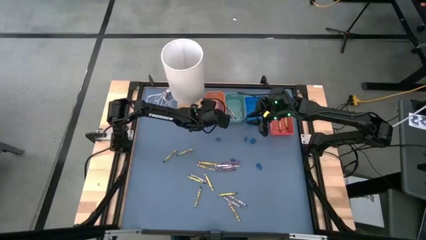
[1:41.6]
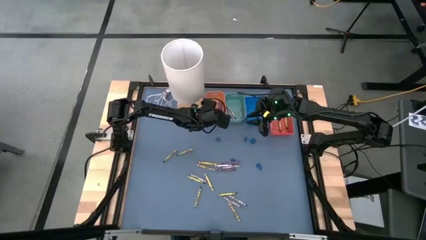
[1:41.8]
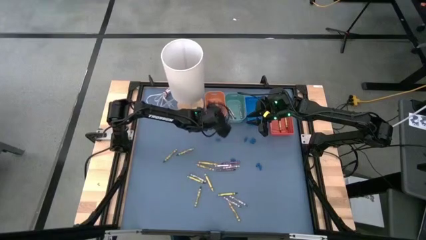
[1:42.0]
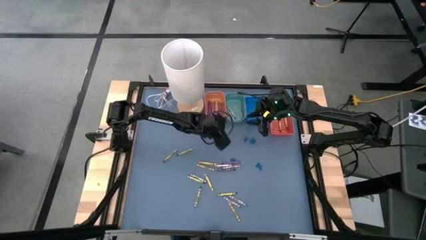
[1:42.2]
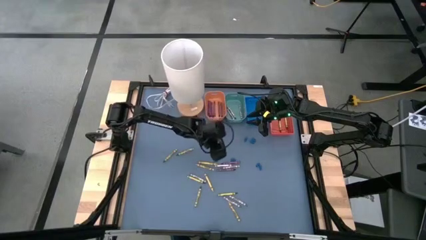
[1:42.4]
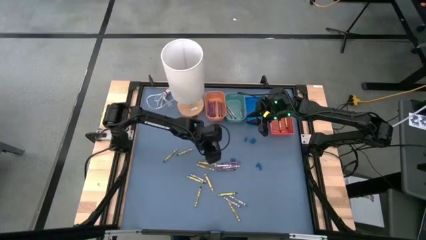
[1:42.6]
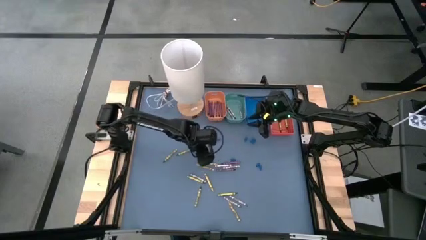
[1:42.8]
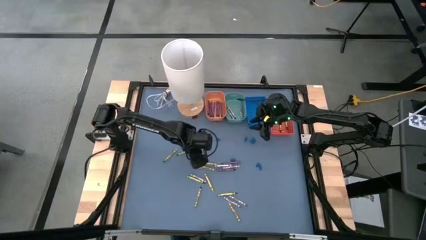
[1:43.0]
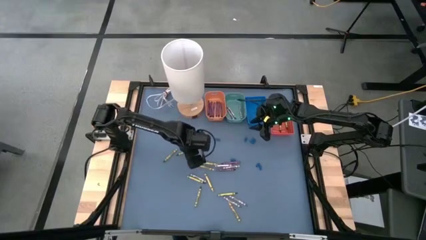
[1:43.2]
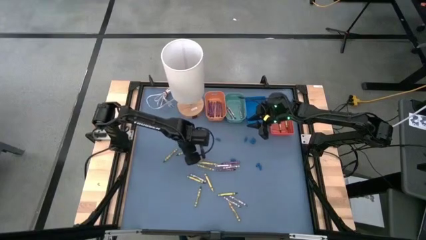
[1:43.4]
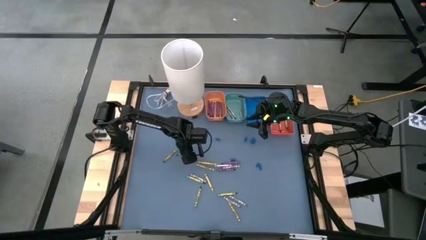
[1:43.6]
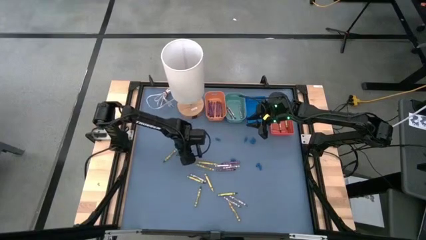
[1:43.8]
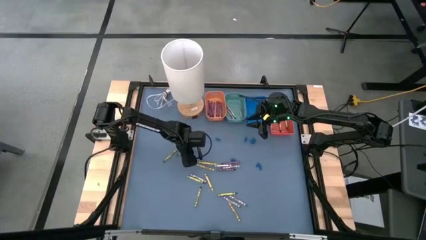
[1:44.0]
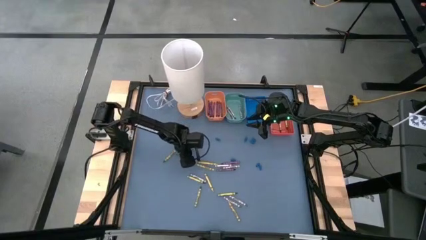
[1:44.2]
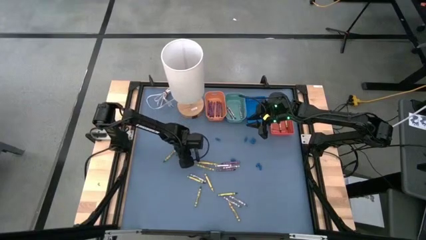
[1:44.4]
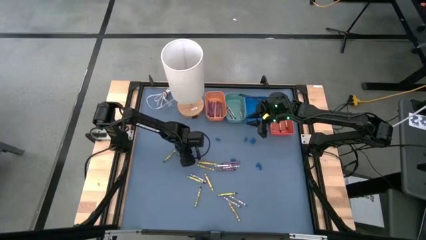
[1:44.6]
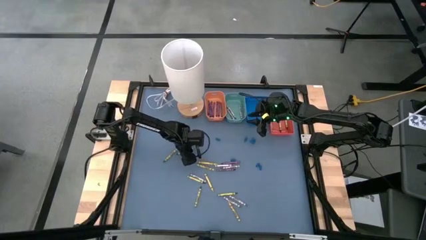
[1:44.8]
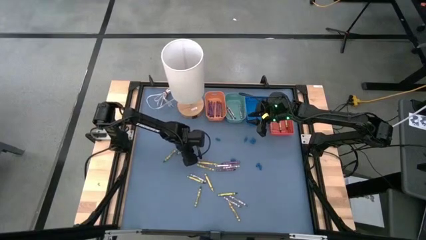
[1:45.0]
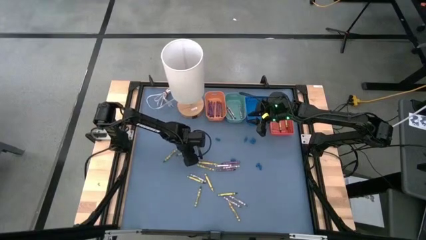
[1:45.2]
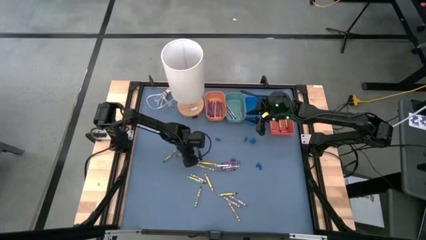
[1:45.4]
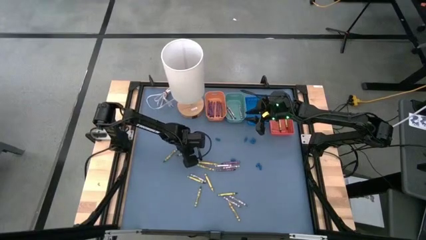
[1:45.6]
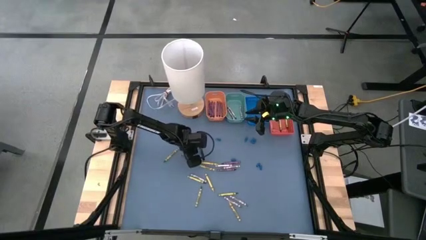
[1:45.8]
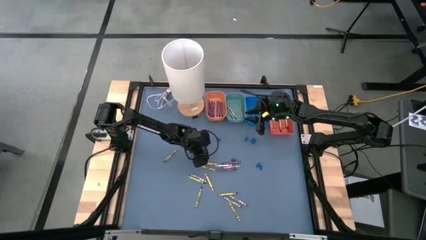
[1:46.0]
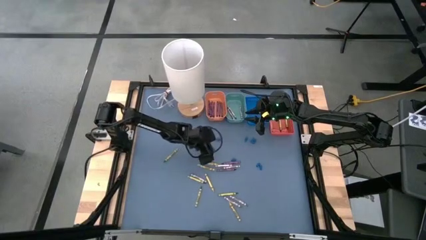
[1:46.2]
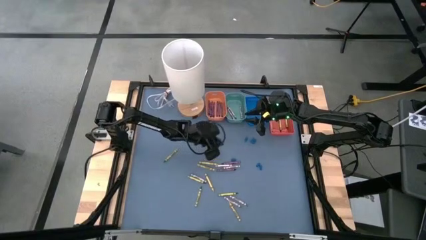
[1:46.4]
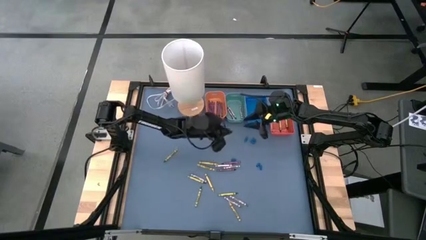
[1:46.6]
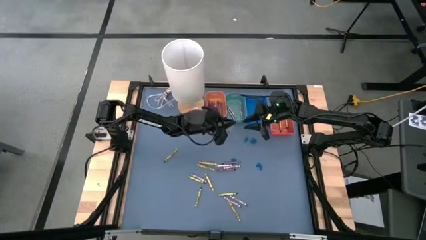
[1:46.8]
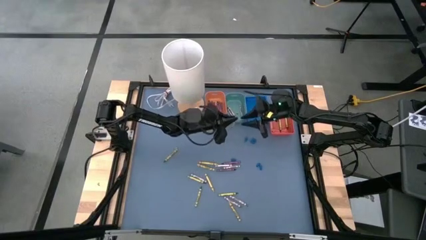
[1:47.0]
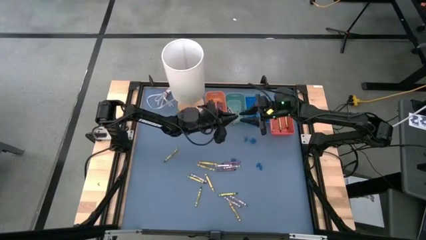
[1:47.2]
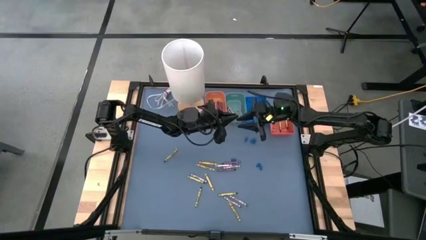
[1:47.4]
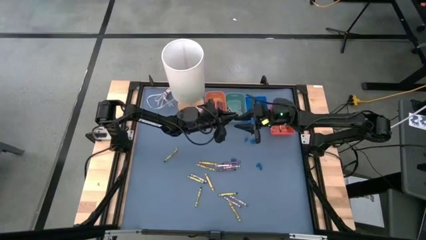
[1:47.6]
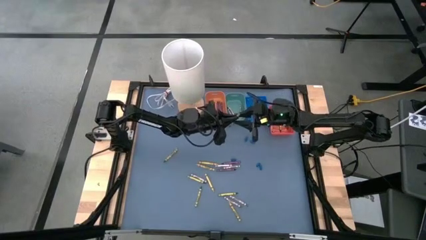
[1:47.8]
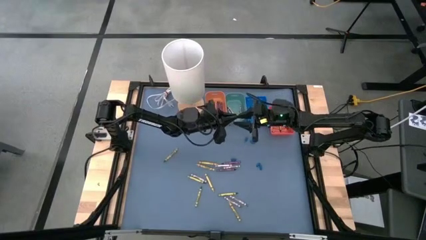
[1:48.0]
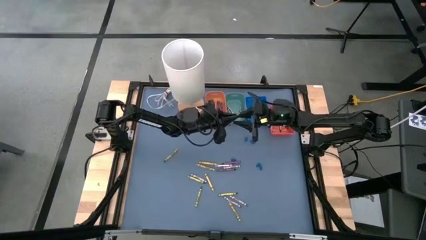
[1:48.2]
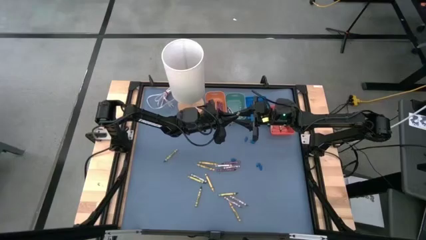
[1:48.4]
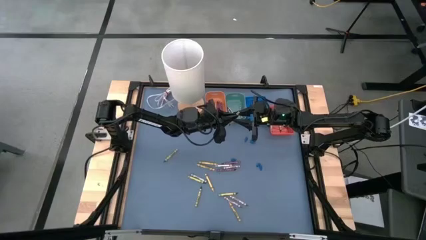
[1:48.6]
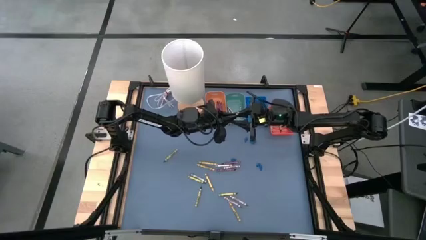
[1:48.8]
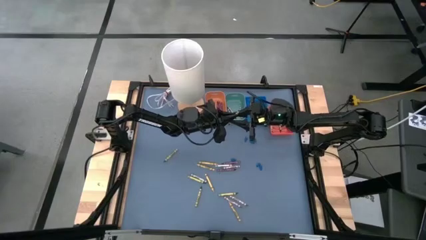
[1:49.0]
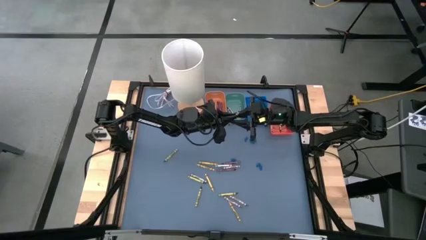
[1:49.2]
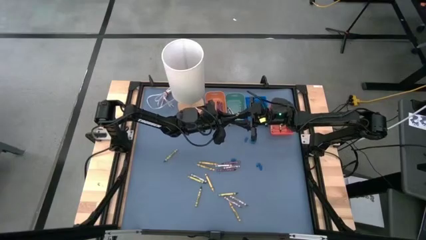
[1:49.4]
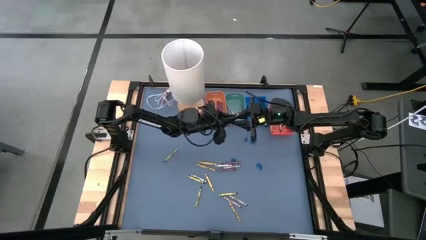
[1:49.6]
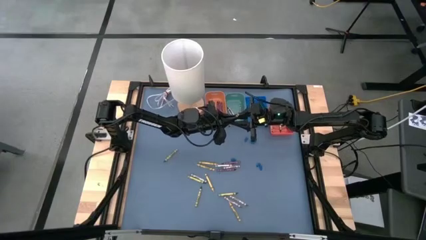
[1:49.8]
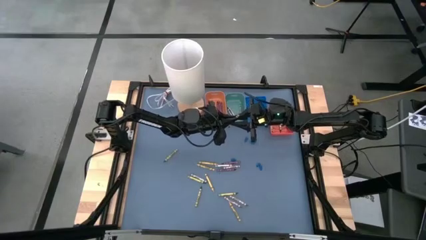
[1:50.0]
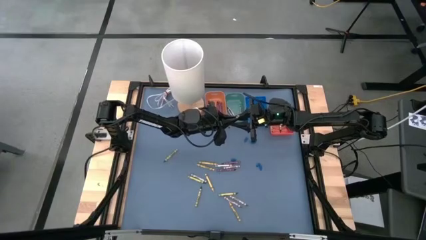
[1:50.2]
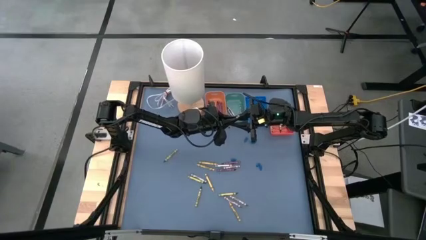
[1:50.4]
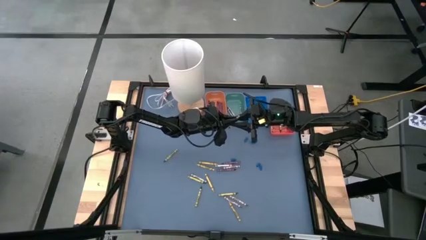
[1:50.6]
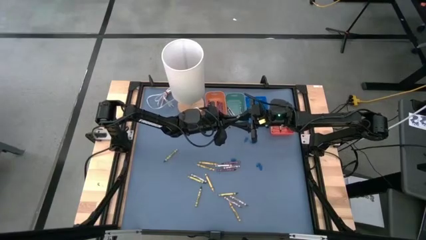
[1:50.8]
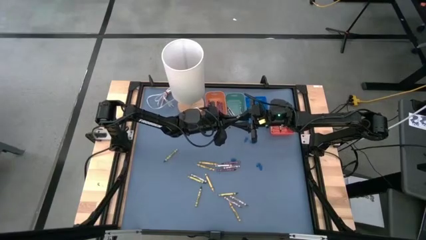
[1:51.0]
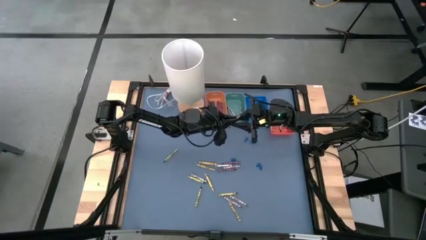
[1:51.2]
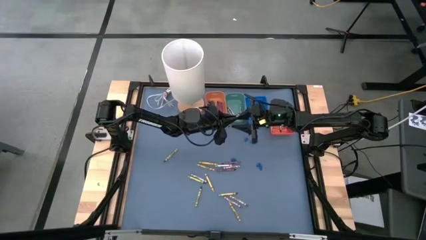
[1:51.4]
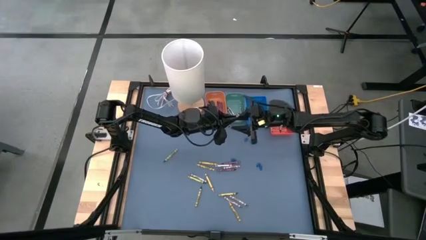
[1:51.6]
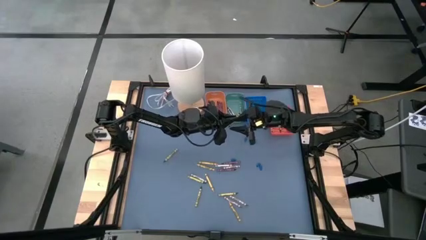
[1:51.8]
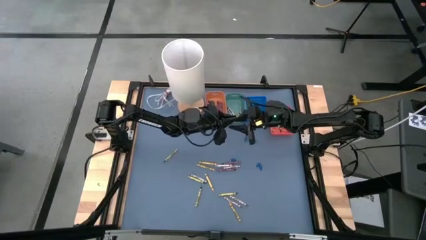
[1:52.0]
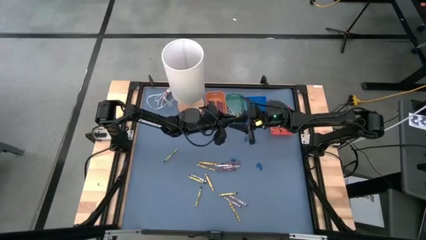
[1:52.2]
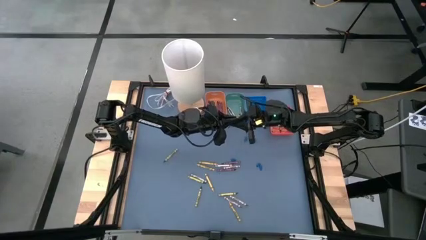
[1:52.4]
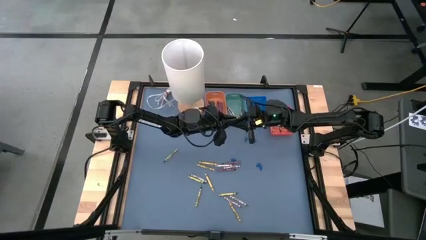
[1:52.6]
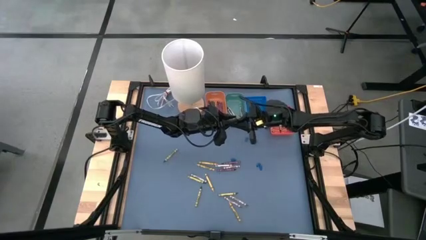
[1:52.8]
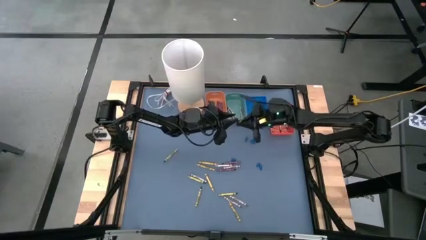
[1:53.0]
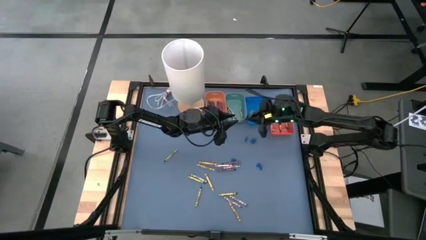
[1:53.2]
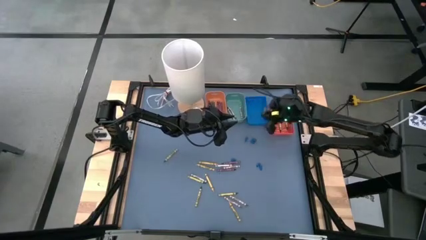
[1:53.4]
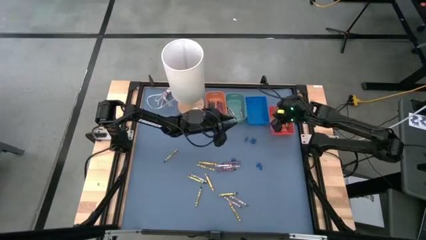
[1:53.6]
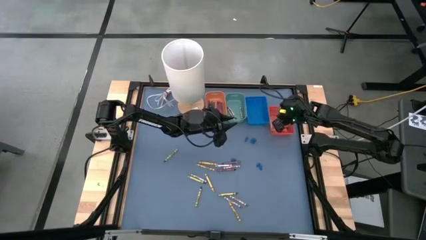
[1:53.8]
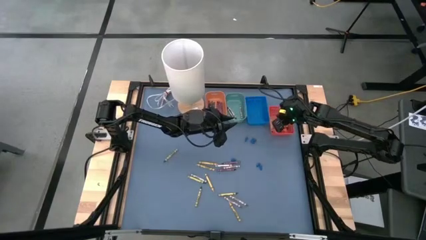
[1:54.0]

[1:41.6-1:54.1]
Task: Sort crayons
Put the green crayon into the orange bin

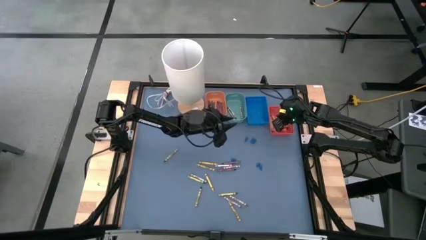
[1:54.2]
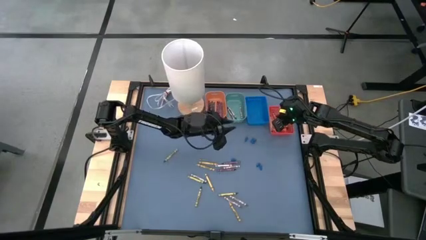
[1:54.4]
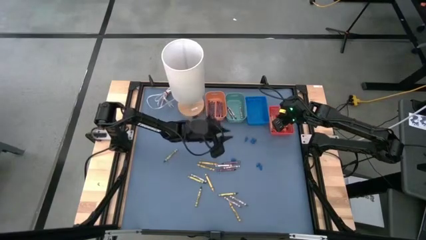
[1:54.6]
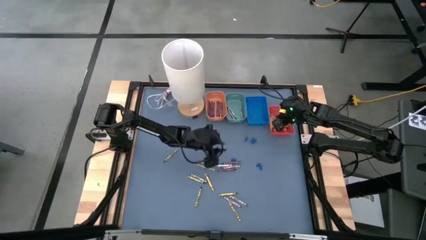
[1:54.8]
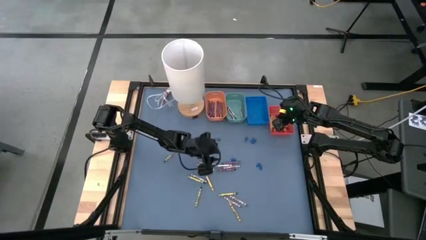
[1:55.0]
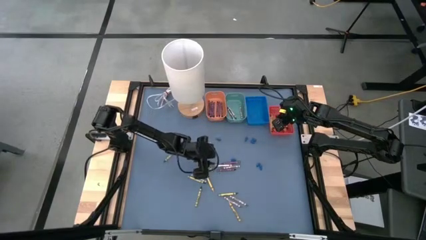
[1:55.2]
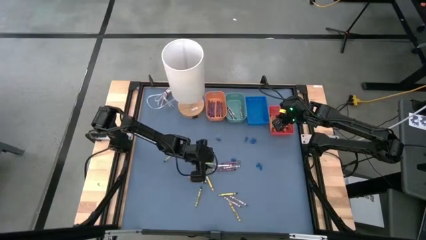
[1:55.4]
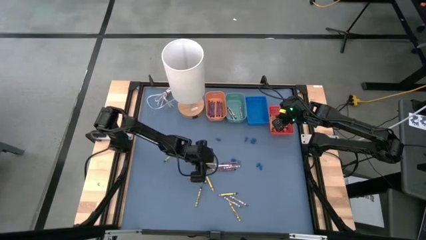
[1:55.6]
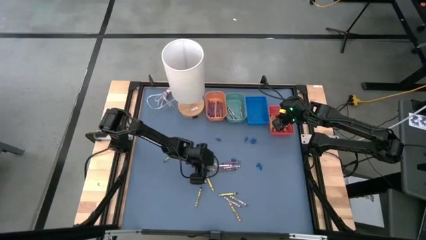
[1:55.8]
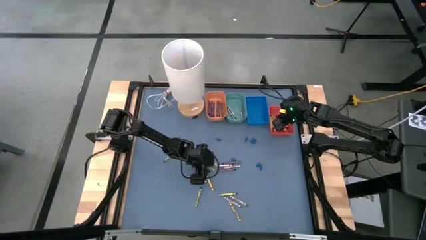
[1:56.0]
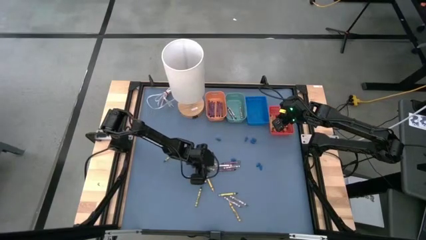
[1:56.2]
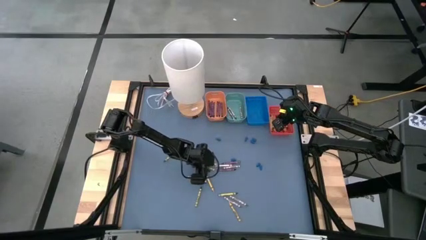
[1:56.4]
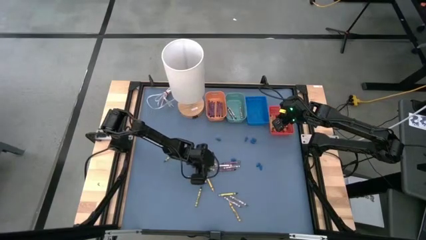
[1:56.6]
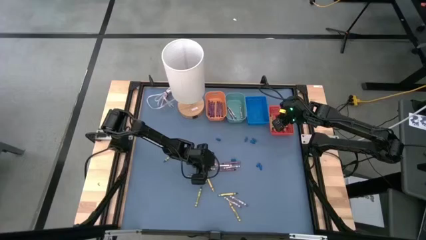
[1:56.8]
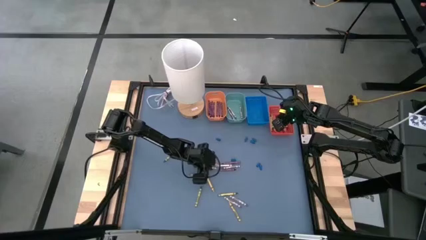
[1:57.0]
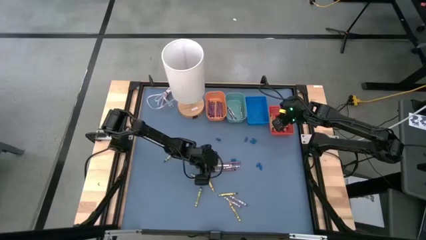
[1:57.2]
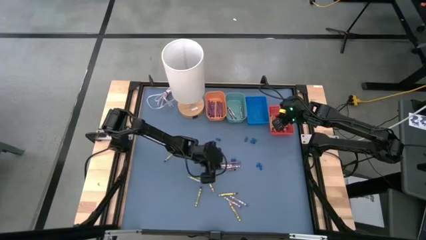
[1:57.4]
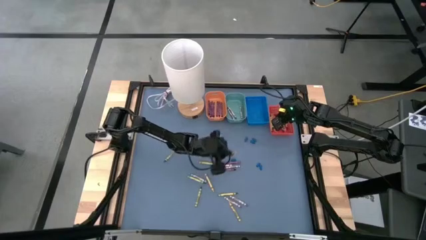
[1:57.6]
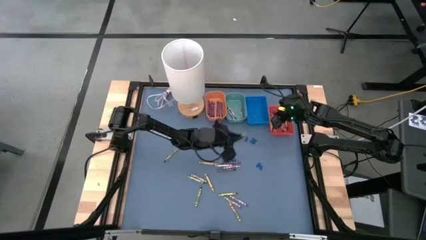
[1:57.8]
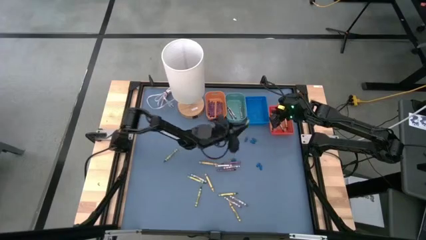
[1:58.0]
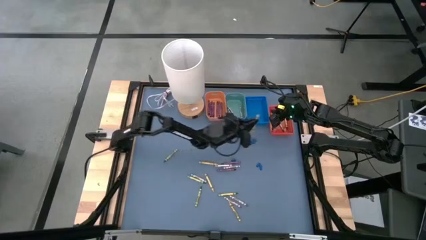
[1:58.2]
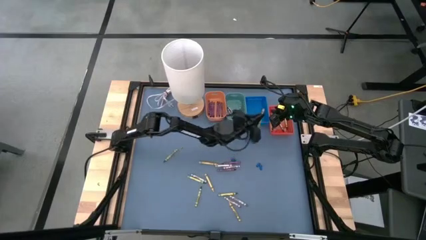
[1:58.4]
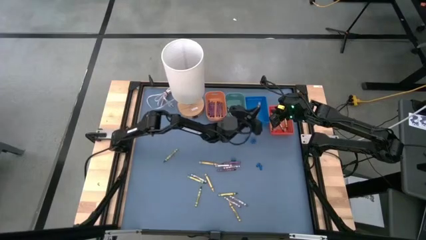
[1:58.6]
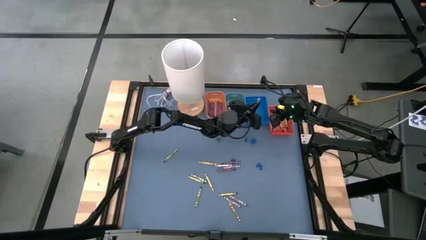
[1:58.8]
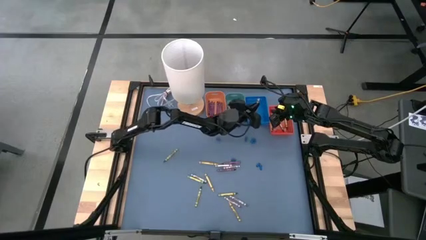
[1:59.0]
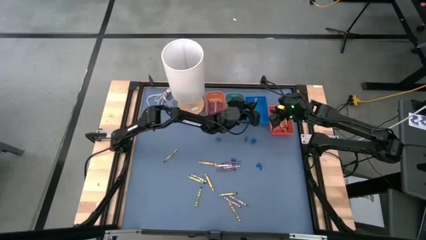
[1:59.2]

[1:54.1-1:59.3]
Put the yellow crayon into the blue bin
